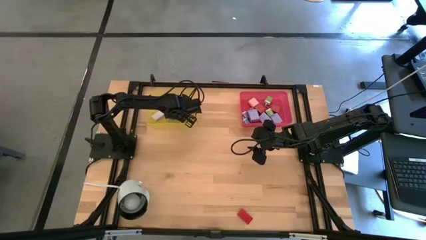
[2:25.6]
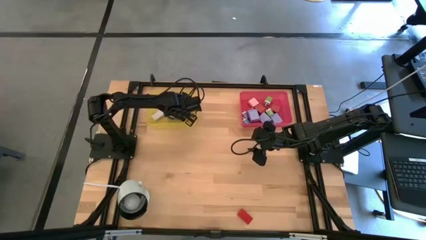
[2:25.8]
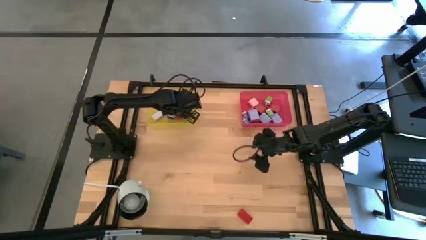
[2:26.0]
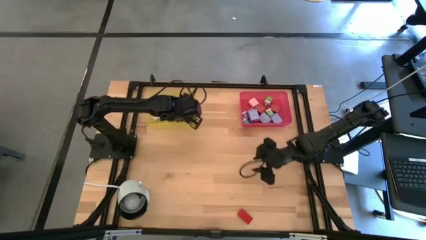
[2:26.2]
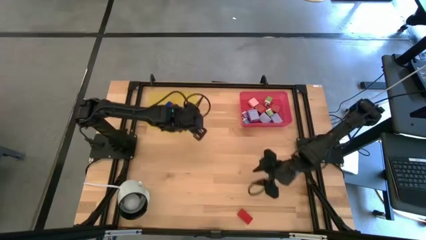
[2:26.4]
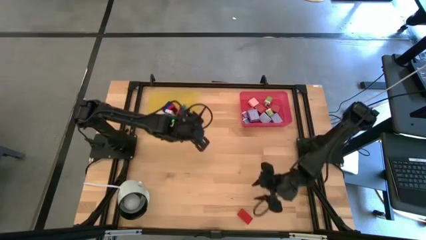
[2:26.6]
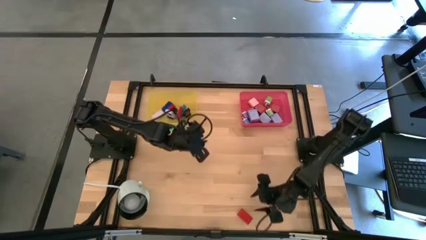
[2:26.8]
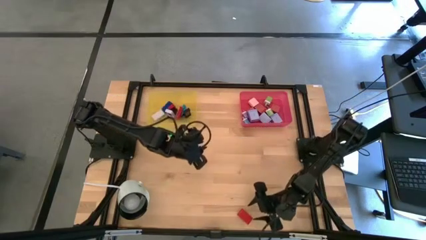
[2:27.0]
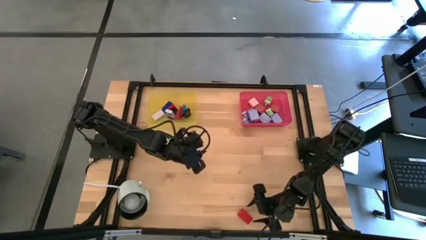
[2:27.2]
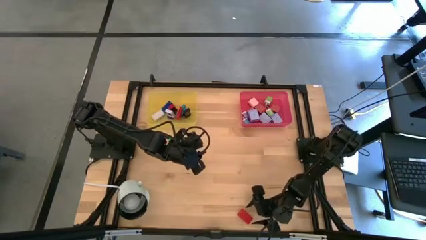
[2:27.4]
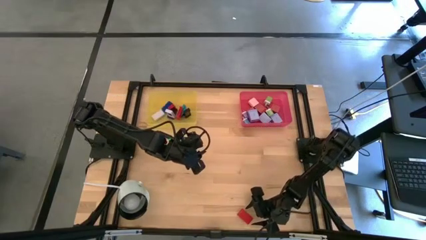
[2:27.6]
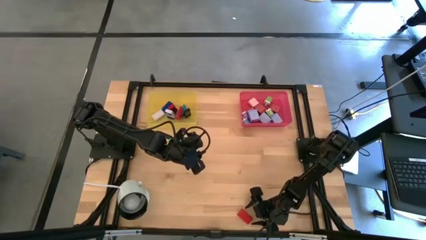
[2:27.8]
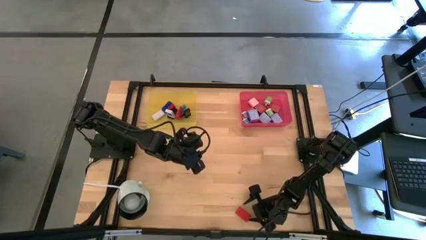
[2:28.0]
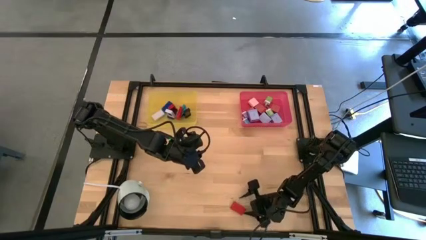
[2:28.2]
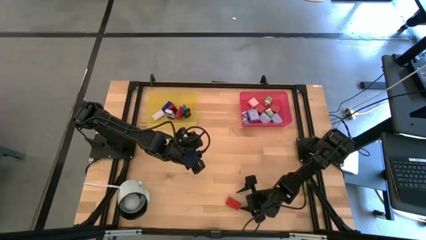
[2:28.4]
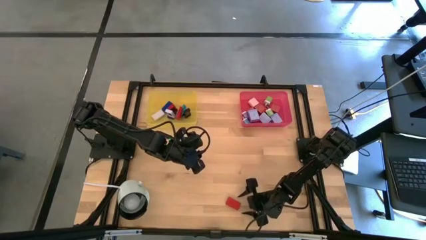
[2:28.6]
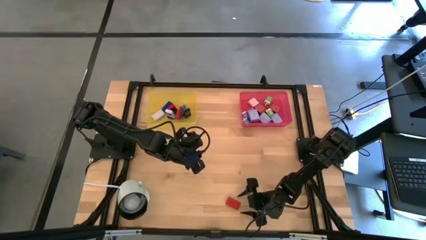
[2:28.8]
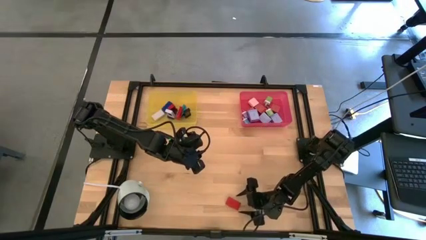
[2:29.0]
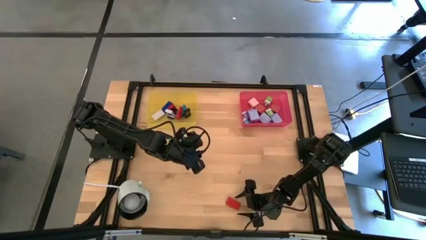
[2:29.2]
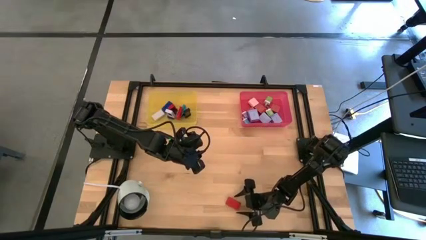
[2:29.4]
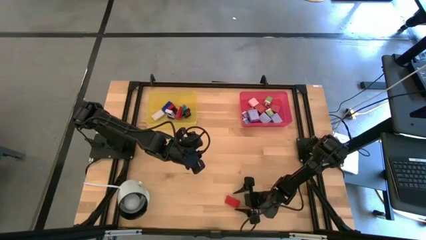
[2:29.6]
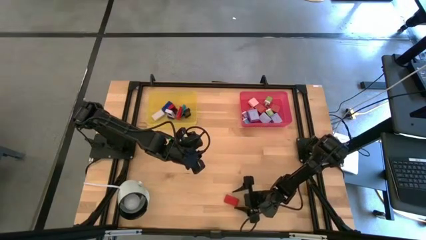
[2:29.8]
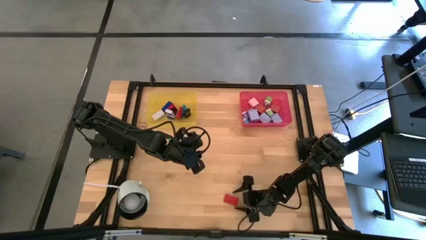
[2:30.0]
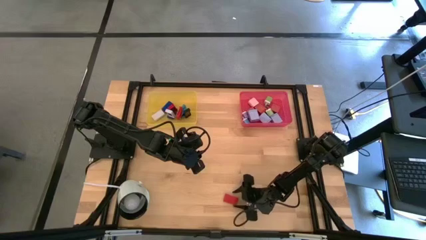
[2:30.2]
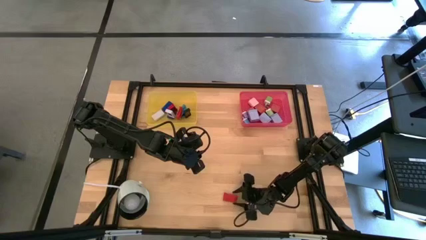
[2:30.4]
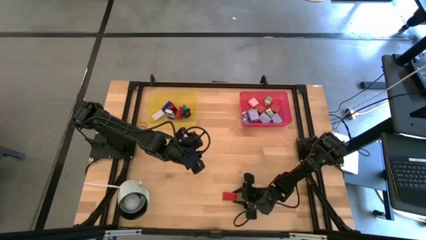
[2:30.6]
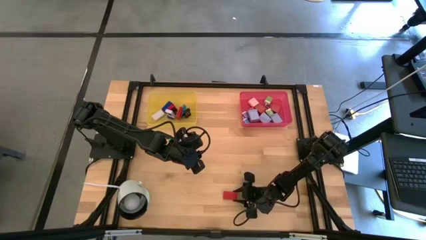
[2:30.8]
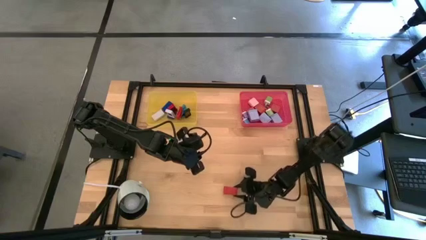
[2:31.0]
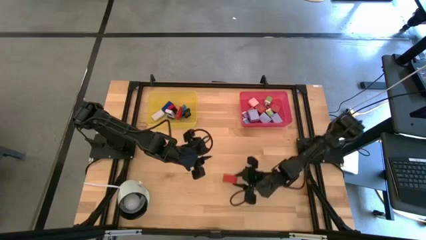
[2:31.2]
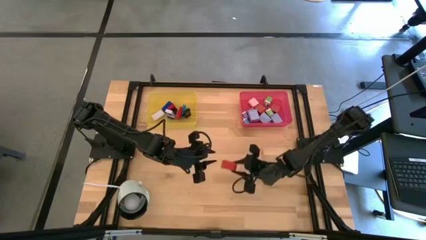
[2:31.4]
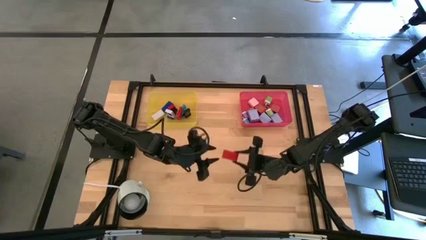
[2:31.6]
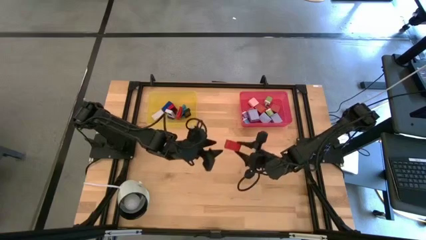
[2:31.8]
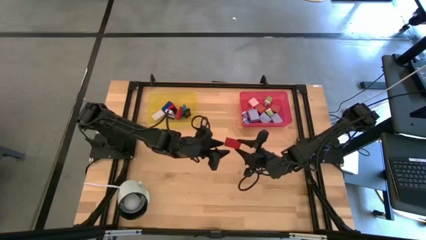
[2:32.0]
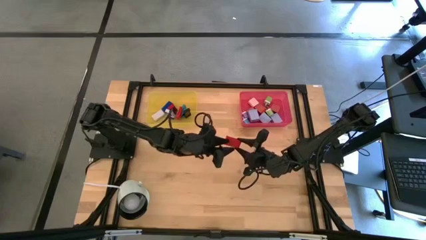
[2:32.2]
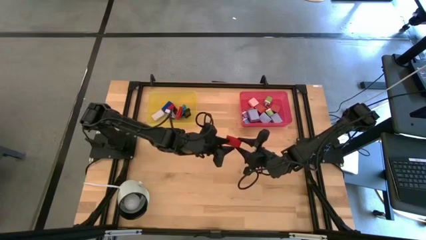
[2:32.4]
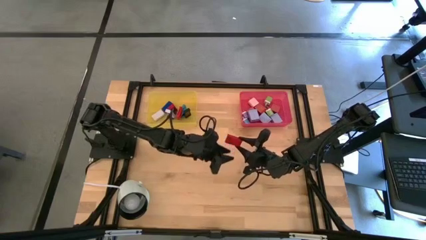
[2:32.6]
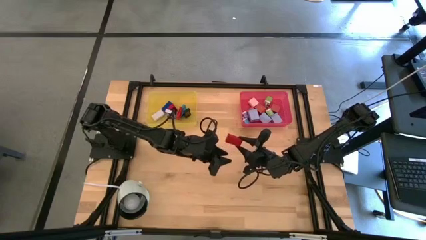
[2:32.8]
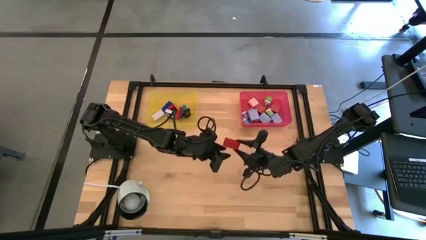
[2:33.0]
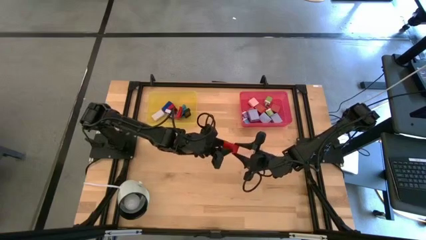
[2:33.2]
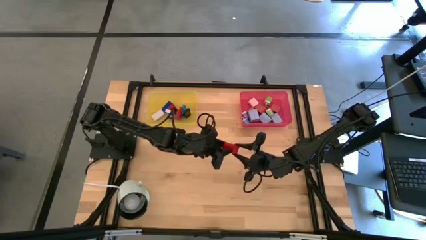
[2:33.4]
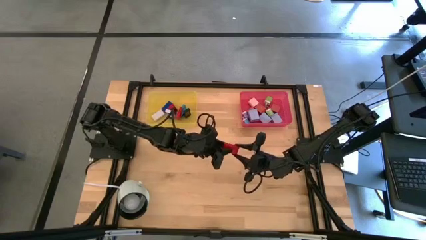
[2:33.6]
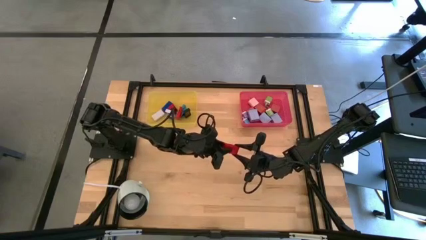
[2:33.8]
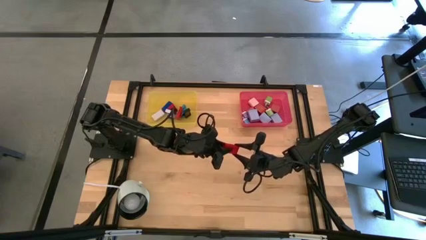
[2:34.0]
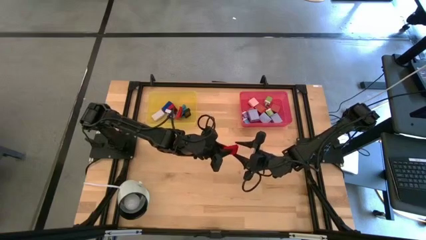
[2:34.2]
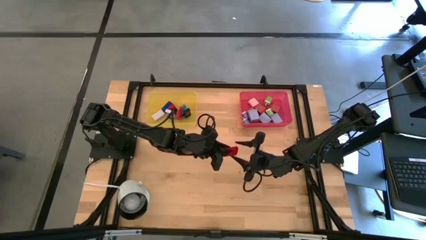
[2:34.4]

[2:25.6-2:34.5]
Task: Pick & Place Office items
Put the red digital clock into the yellow bin

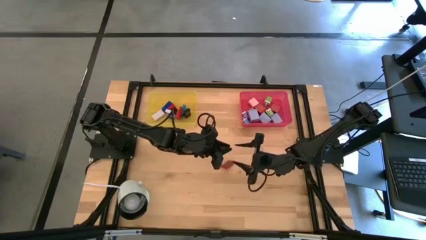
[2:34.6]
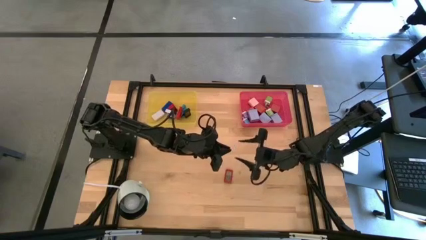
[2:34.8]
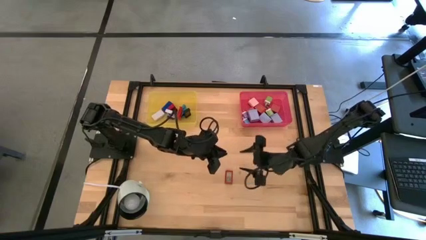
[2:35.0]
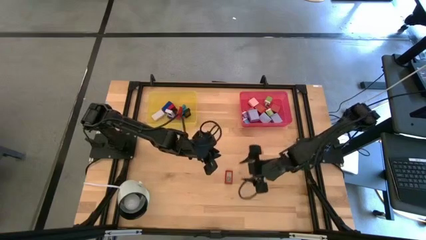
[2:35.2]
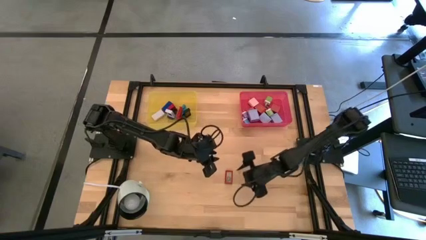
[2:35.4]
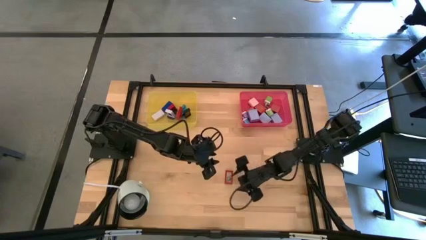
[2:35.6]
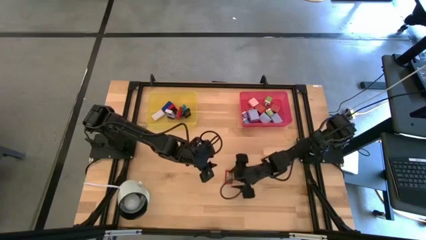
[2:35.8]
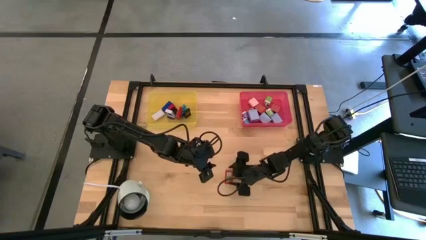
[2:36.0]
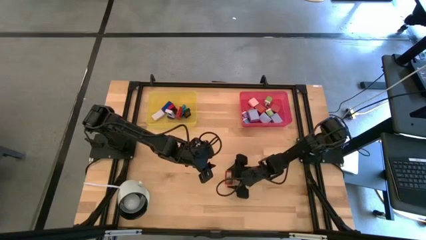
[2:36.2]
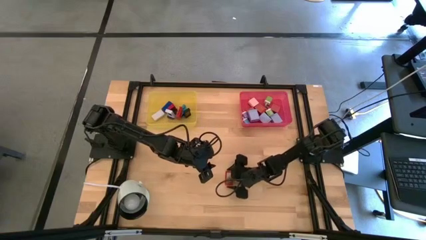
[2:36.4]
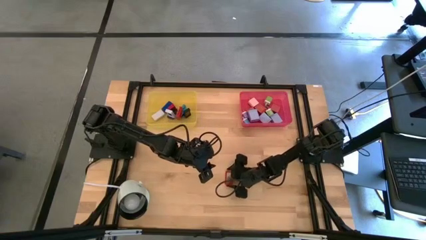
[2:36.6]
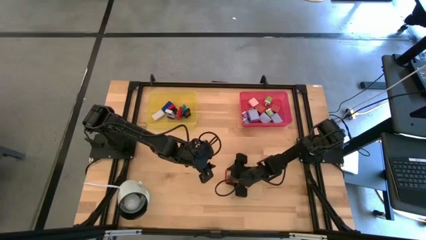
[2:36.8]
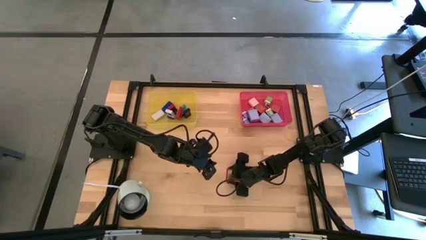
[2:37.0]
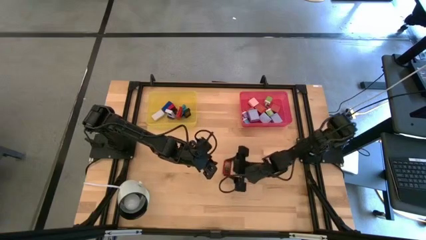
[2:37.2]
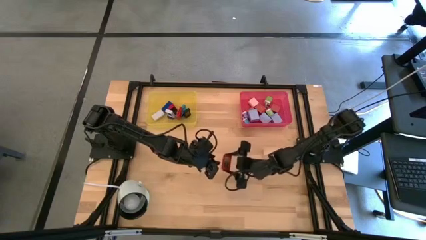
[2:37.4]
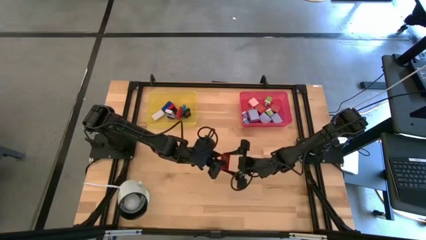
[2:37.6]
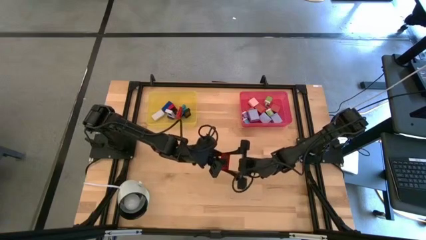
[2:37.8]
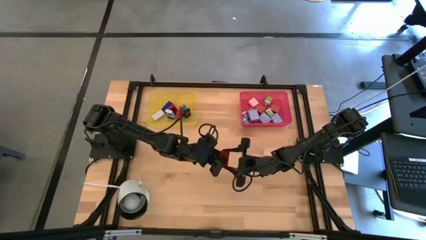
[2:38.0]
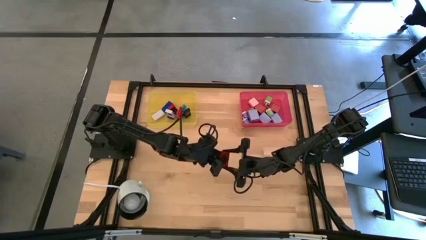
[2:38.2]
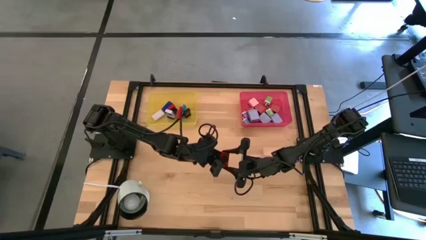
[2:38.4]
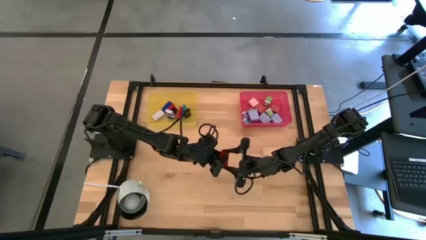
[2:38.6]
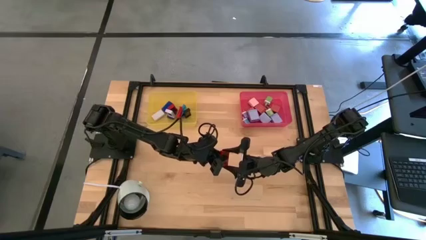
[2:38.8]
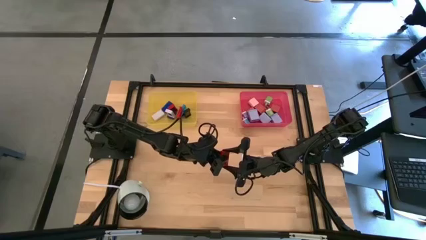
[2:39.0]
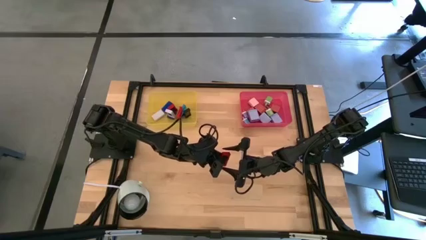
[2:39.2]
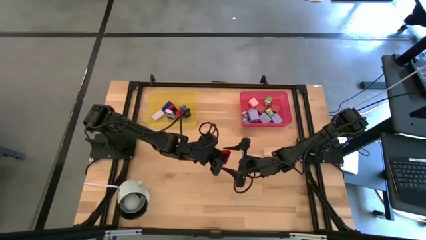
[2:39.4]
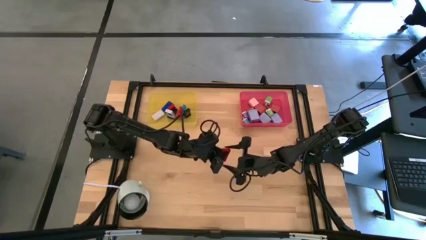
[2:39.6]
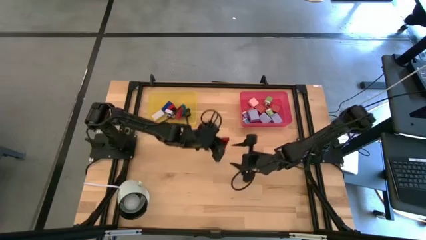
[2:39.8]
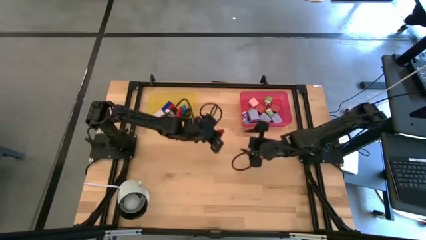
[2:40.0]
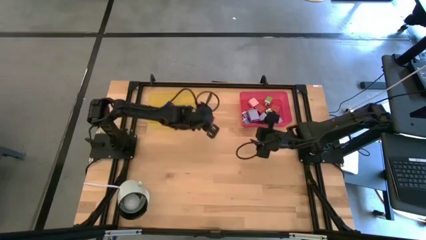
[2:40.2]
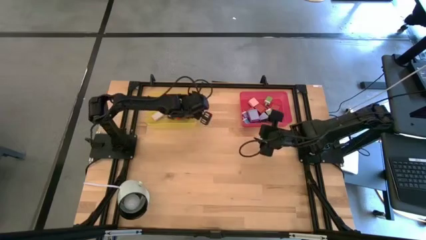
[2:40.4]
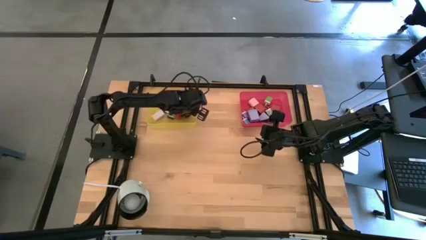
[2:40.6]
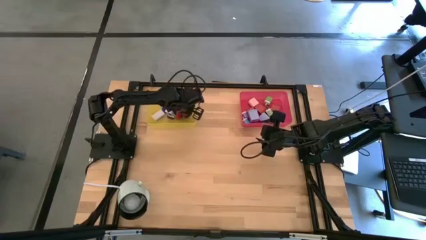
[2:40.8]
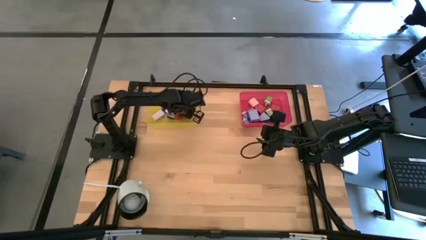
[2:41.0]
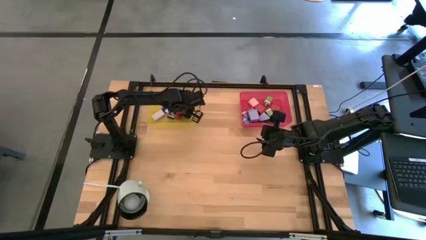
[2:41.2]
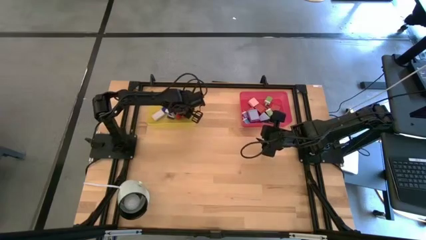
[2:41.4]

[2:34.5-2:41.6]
Put the red digital clock into the yellow bin
